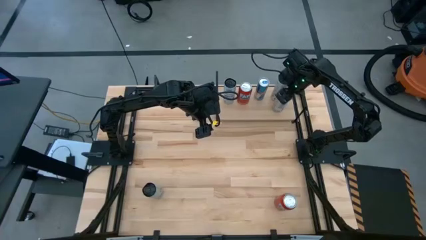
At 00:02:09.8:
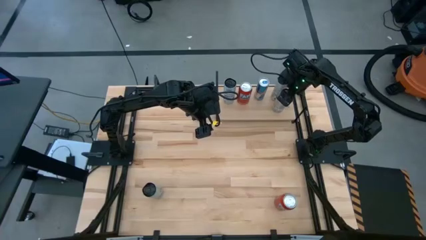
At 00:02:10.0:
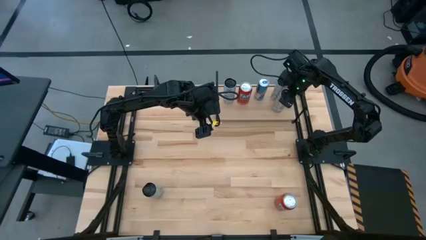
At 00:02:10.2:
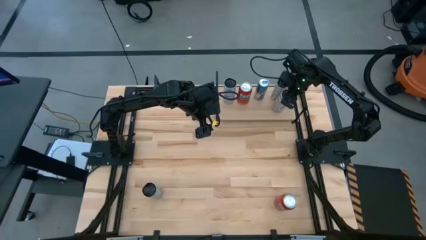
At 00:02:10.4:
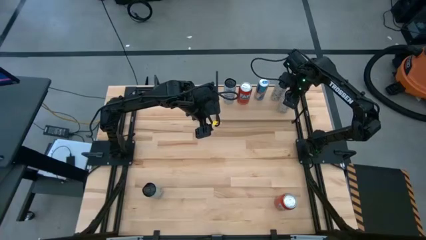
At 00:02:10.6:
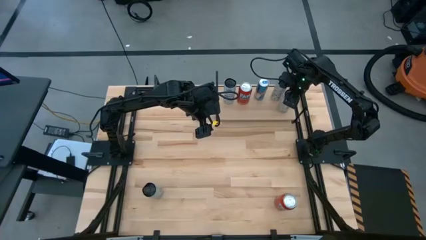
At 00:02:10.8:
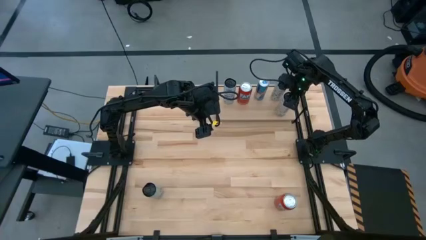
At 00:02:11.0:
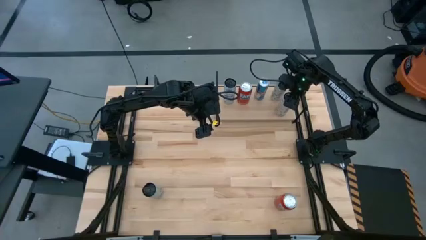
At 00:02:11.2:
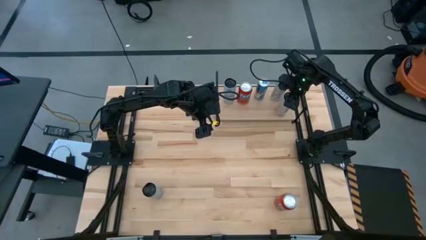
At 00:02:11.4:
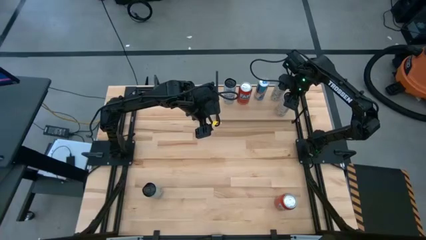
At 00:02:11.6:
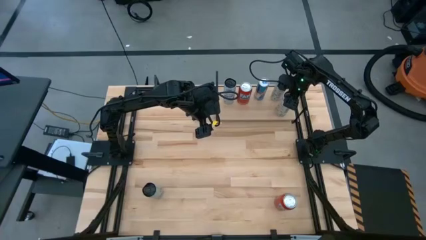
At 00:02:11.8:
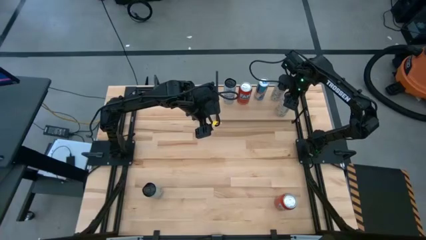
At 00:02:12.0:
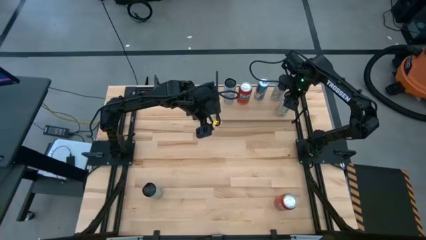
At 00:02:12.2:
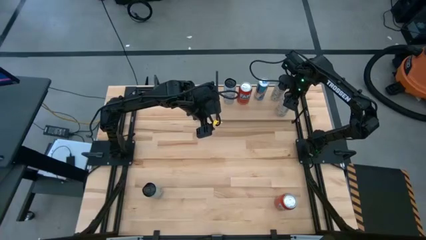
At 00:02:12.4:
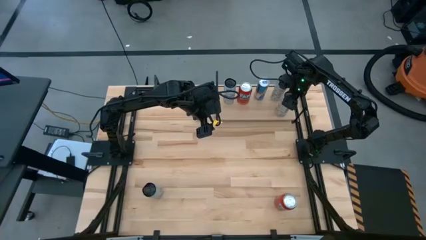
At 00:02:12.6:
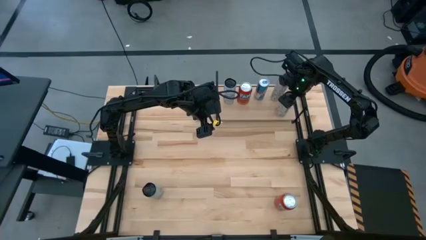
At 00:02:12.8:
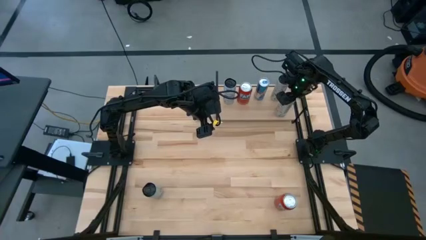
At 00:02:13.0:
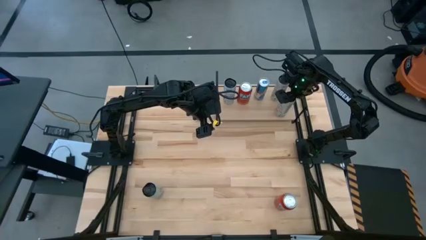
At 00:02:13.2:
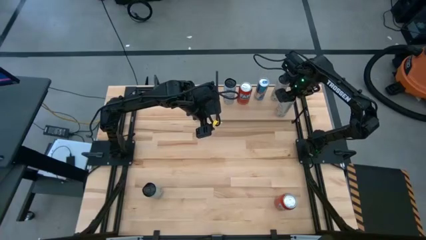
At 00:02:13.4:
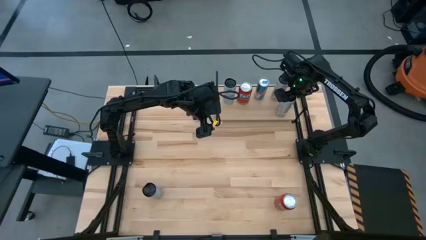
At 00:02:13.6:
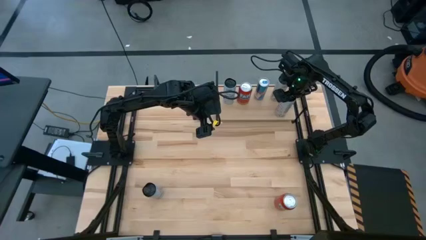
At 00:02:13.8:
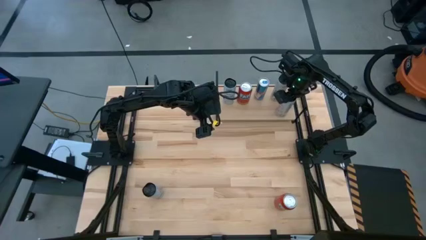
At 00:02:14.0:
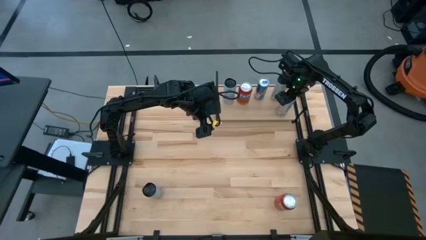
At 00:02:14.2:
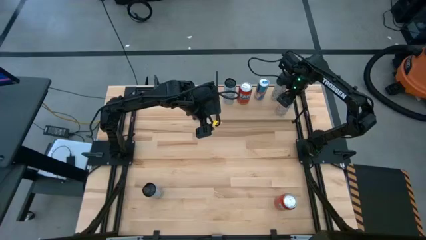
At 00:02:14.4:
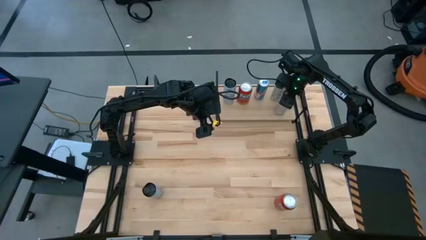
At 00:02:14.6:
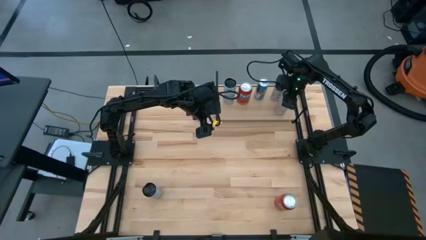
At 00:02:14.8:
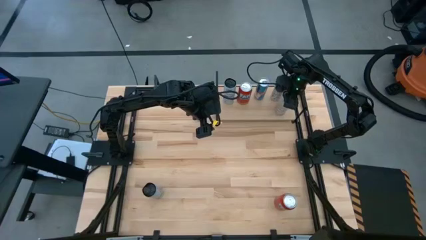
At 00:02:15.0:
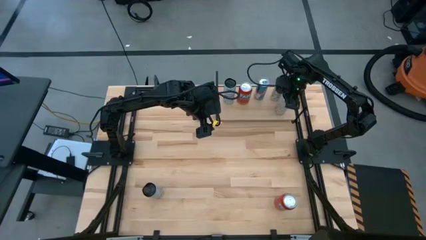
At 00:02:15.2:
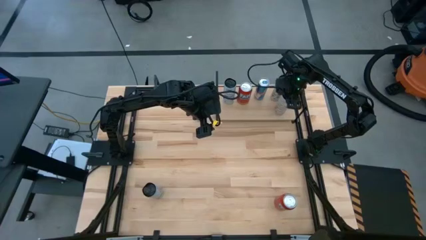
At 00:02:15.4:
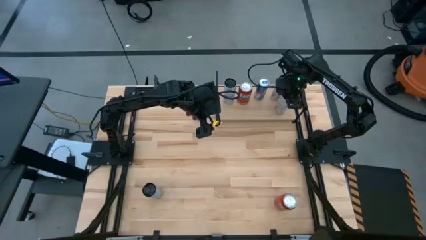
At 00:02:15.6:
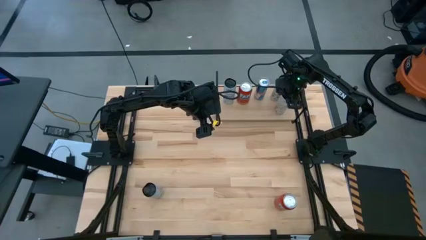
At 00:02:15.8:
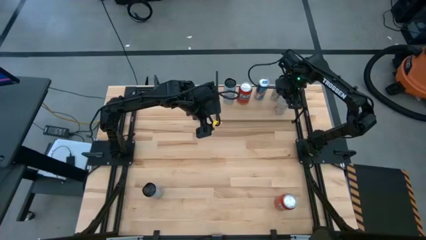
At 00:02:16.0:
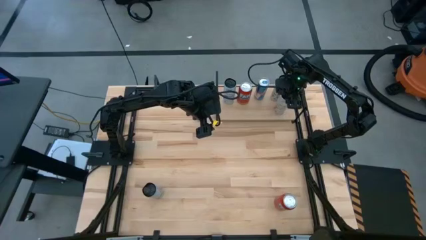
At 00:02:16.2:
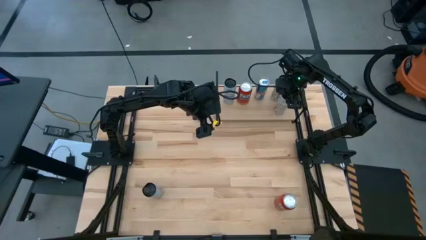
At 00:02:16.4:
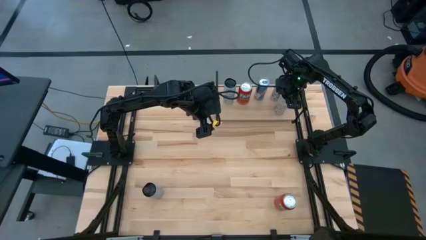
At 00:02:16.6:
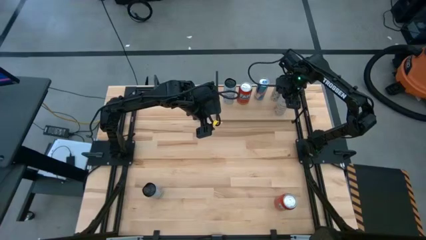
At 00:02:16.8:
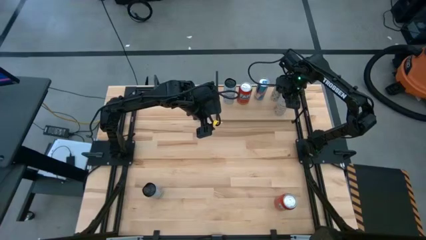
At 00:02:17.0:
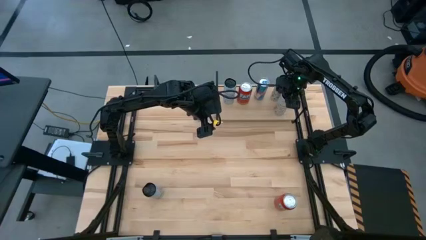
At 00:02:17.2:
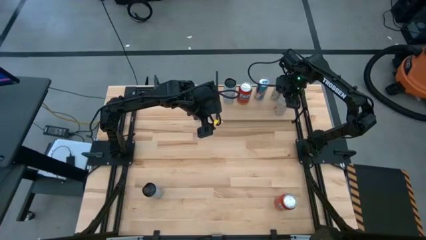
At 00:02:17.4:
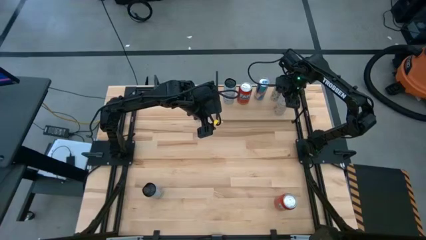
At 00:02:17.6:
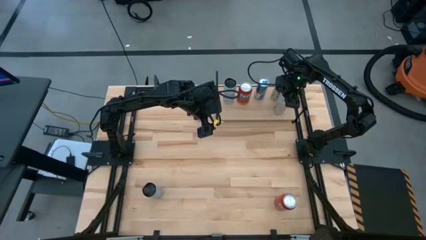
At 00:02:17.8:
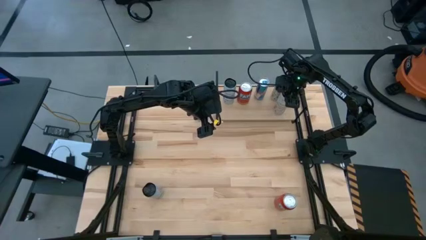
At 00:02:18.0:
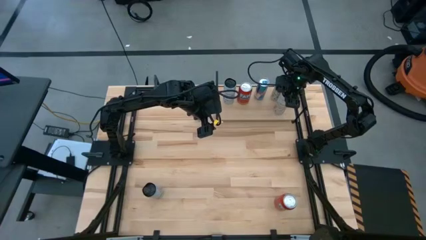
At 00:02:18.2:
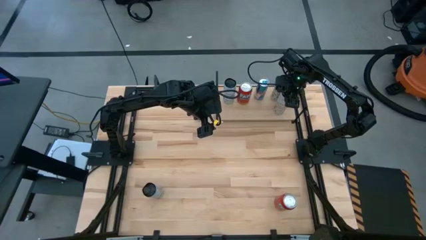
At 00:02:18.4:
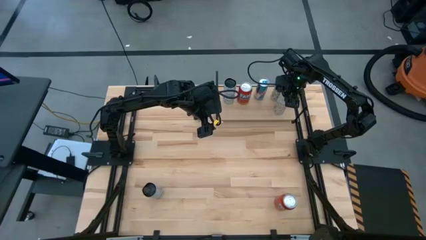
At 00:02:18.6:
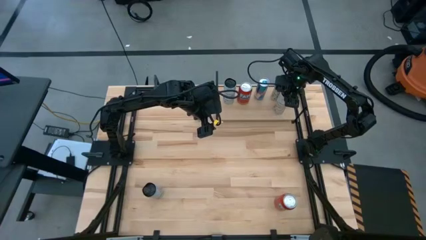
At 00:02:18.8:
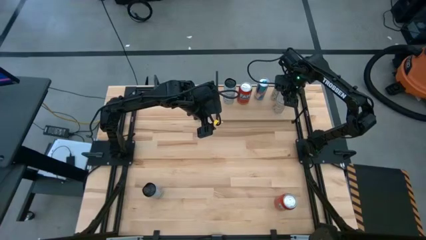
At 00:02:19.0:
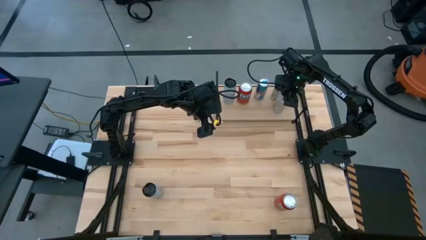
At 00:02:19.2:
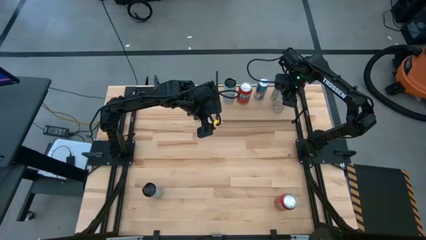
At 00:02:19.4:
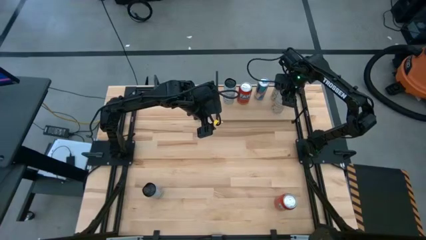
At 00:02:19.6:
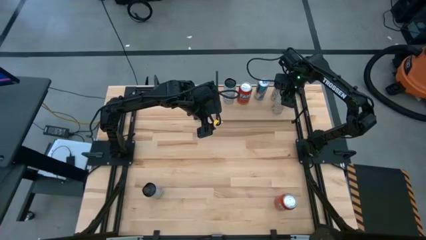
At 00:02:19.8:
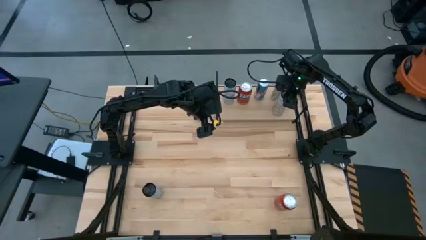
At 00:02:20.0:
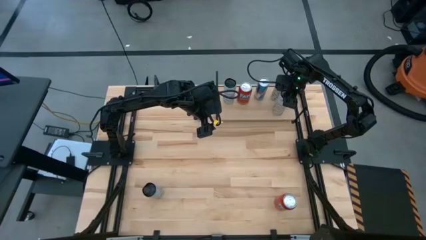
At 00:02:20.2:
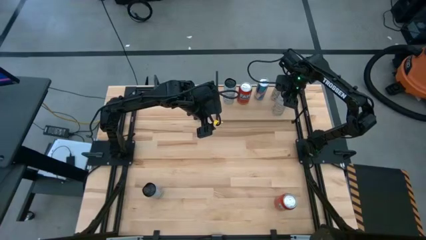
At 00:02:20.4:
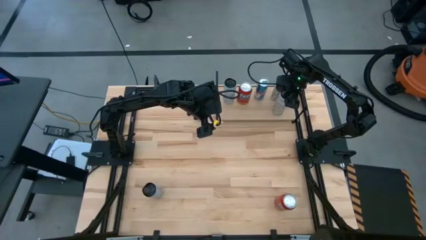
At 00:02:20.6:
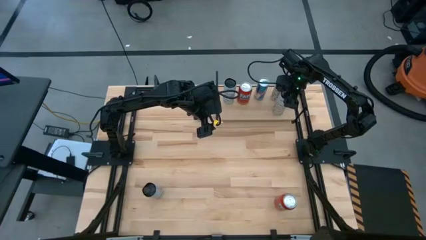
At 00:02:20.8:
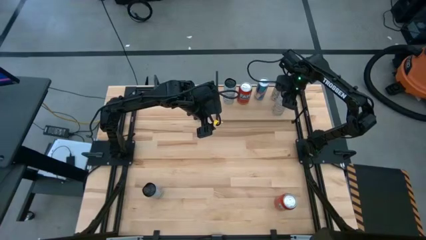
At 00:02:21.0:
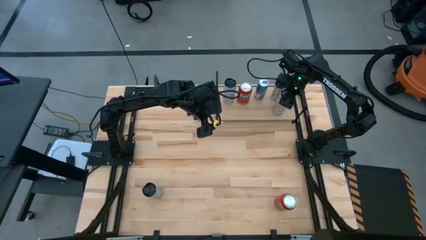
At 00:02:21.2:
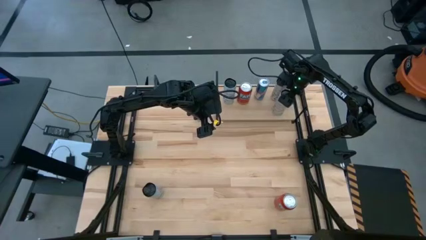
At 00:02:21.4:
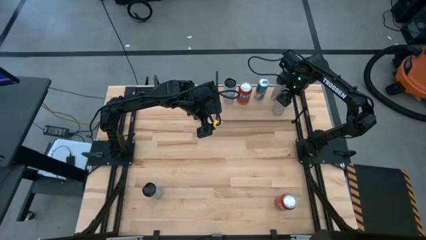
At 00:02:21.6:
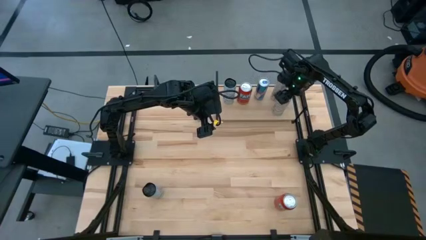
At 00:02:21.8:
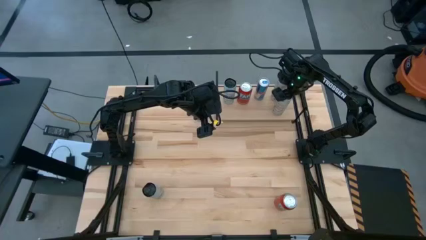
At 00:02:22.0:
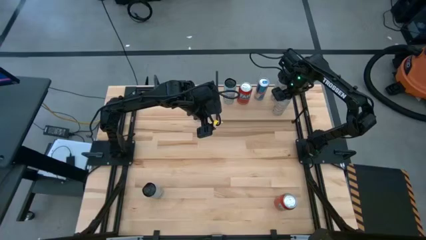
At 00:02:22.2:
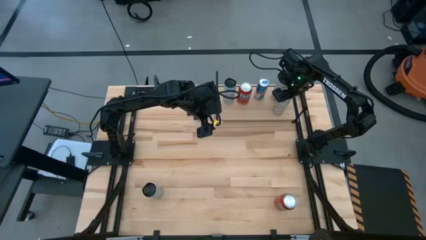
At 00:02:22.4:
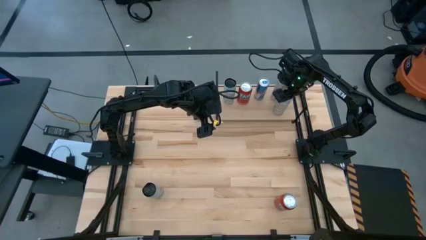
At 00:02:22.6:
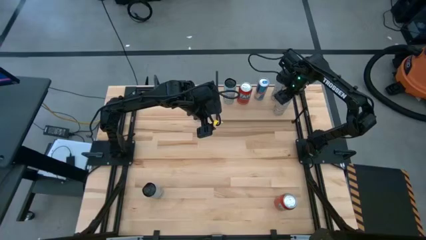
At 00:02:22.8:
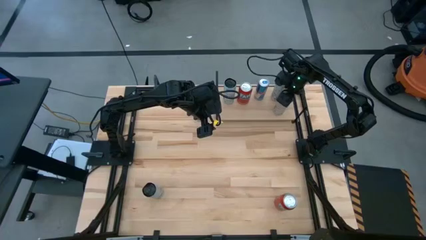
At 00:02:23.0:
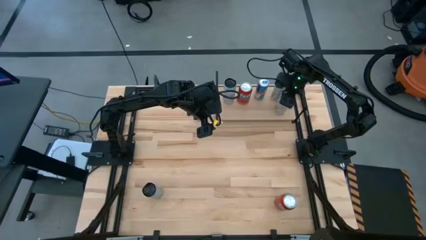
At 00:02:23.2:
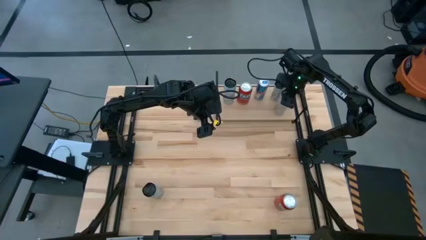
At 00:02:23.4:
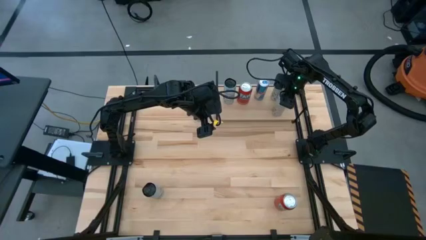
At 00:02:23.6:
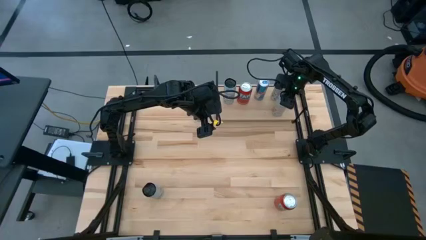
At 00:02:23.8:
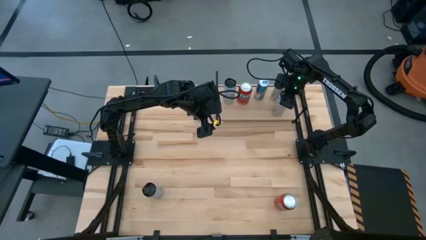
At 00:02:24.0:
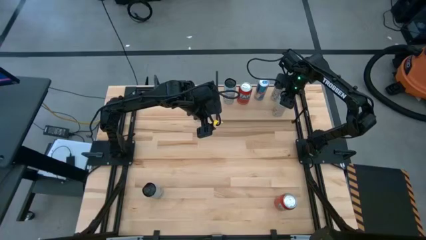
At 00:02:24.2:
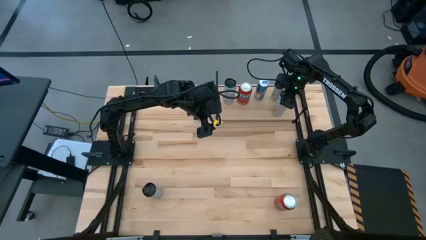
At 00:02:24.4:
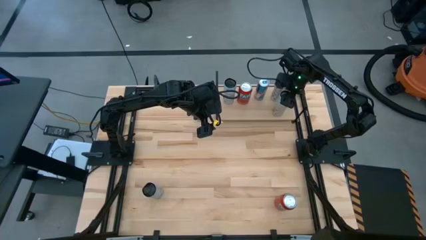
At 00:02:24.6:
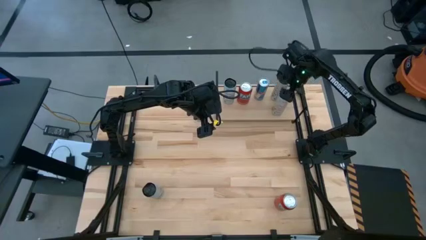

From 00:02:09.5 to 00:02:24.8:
Task: Place canned beverage on shelf
Put the white yellow soda can on the shelf aligned with the other white yellow soda can
